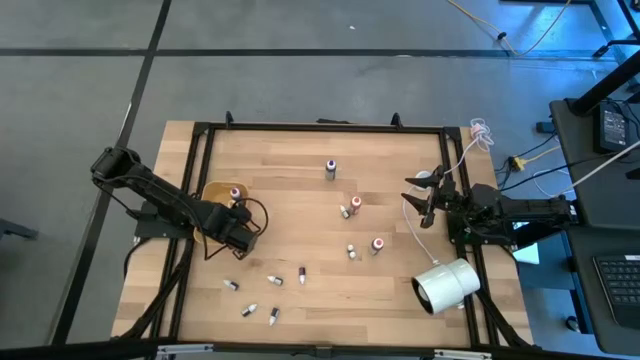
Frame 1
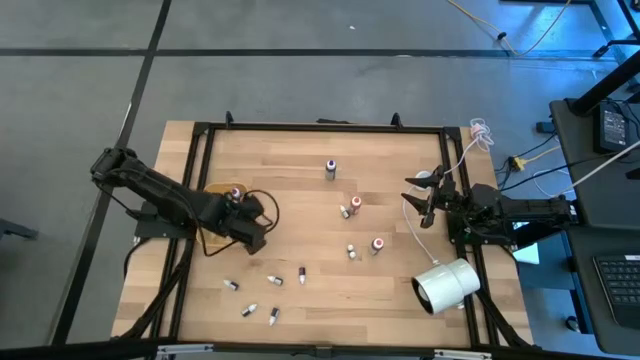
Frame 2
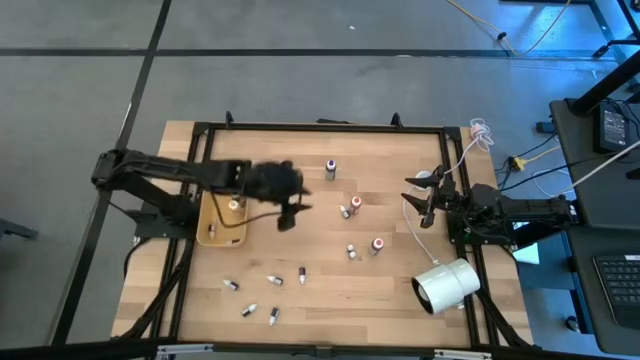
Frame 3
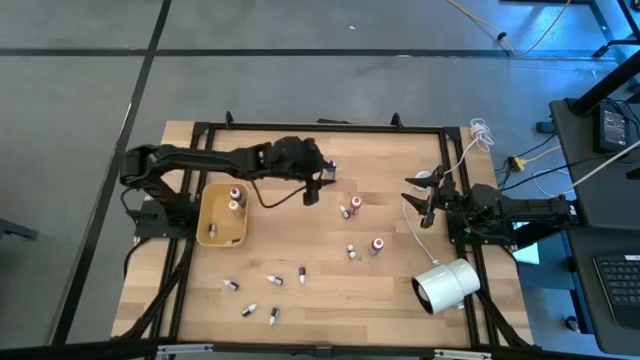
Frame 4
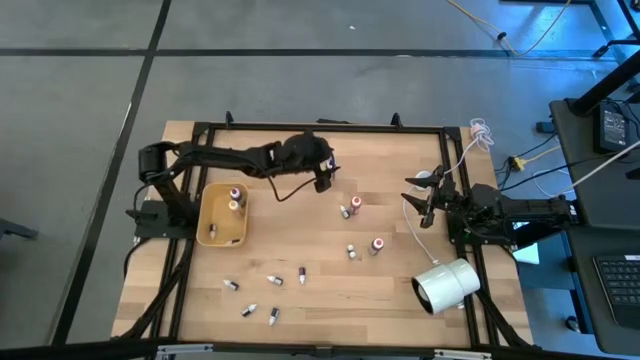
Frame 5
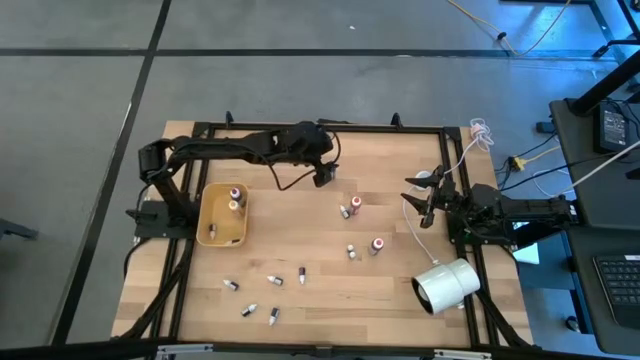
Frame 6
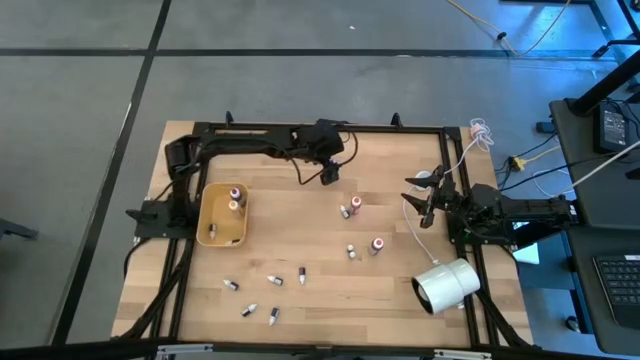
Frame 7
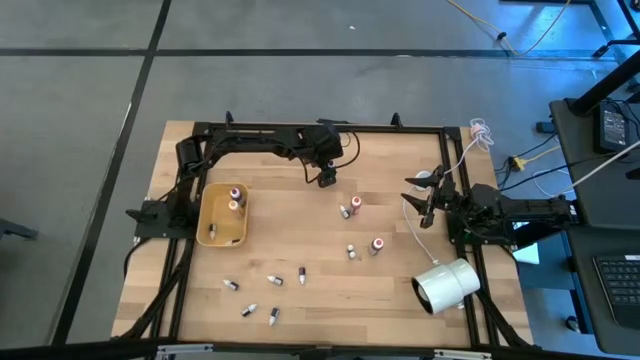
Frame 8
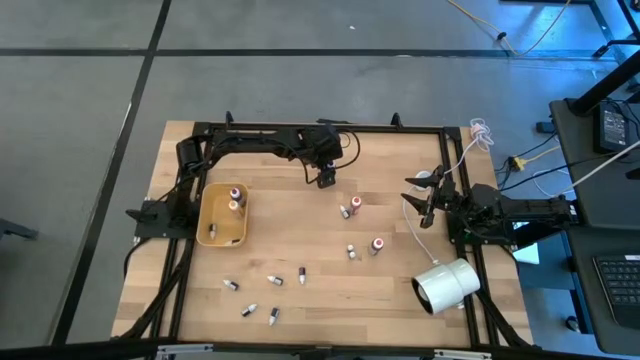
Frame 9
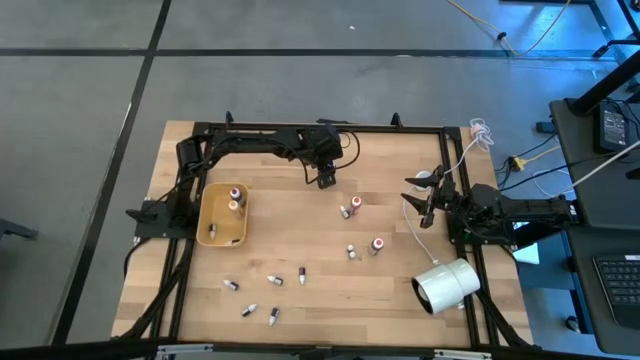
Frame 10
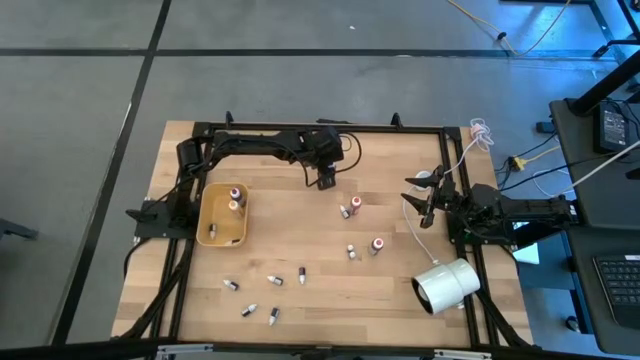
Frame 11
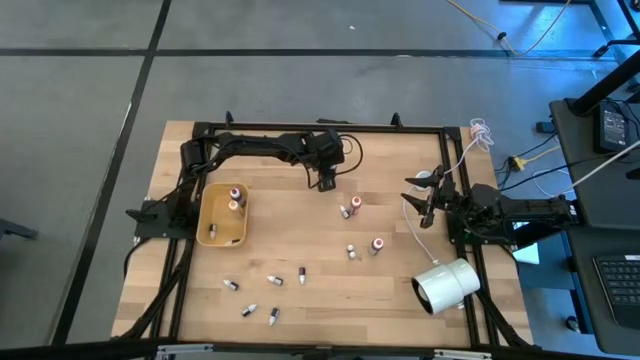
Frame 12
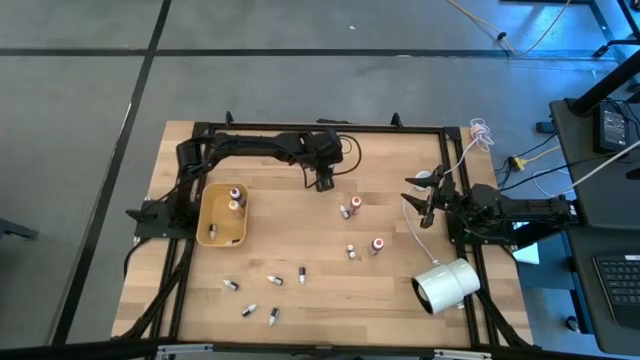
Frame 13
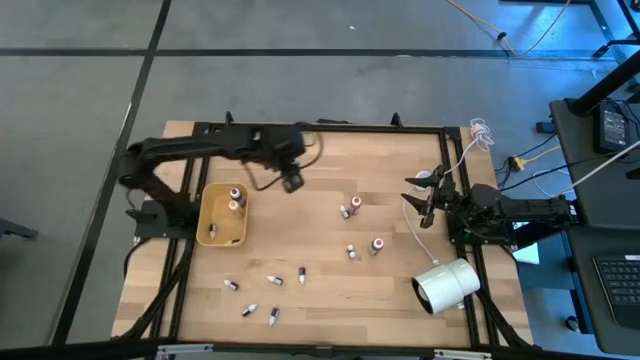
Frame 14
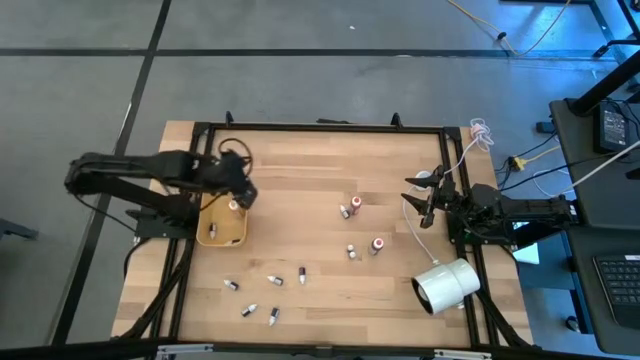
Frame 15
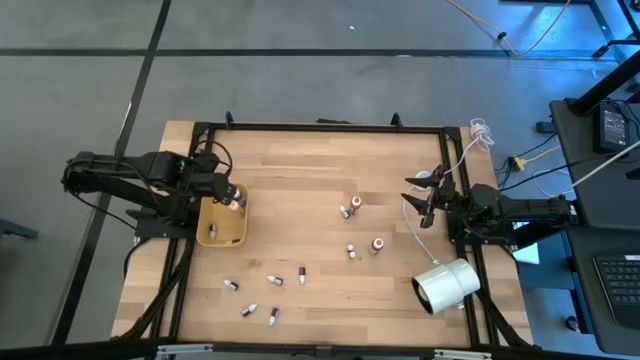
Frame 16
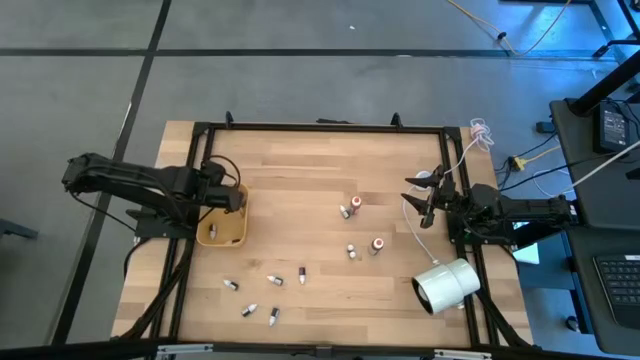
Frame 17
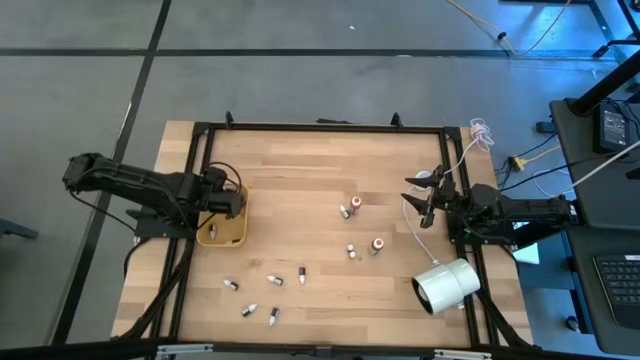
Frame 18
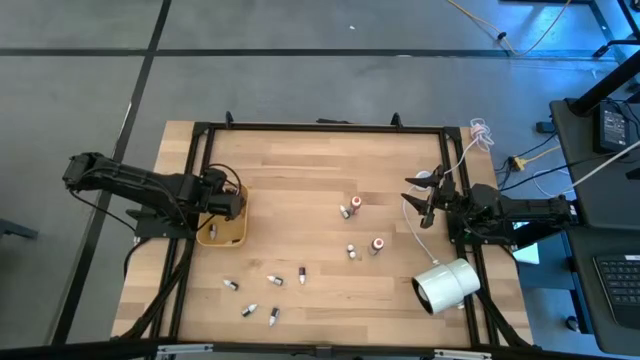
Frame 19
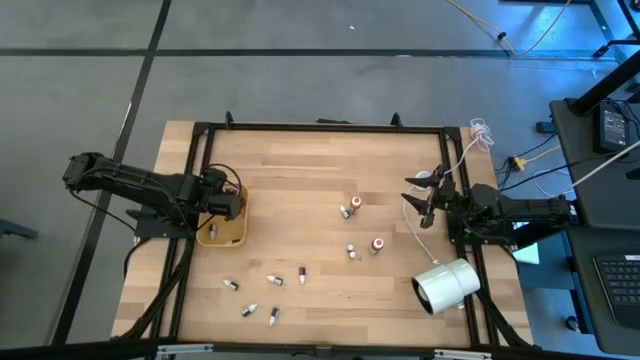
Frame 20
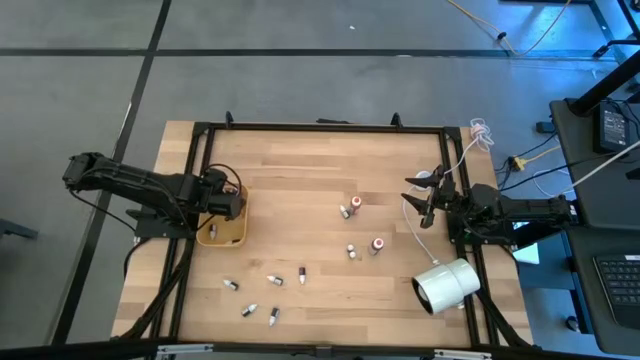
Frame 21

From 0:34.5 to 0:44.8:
Task: Pick & Place food coloring
Put the large blue food coloring bottle into the yellow bin

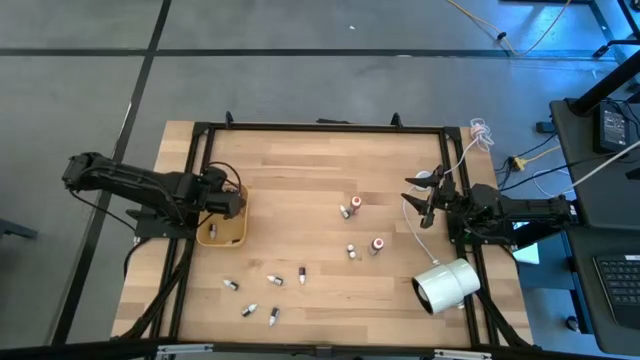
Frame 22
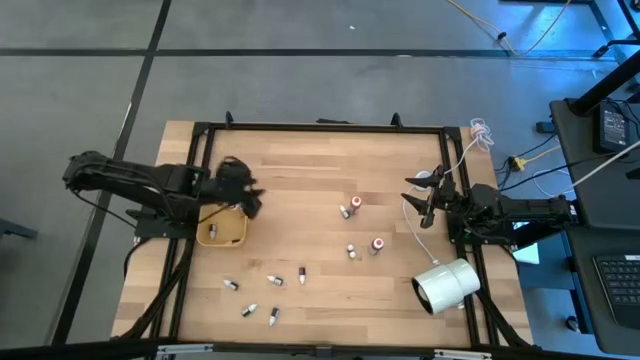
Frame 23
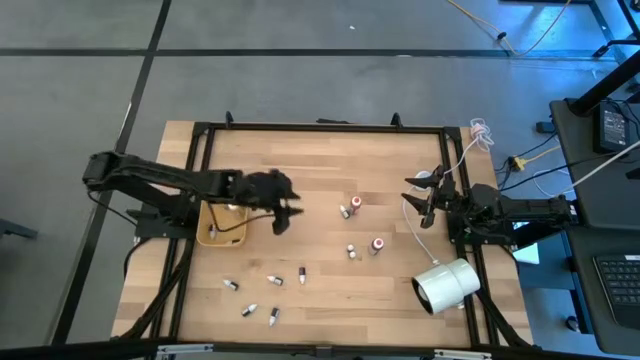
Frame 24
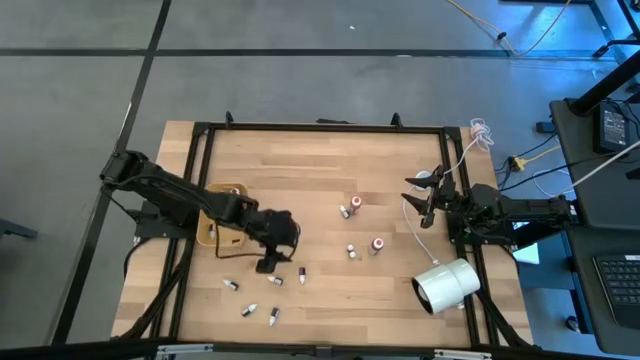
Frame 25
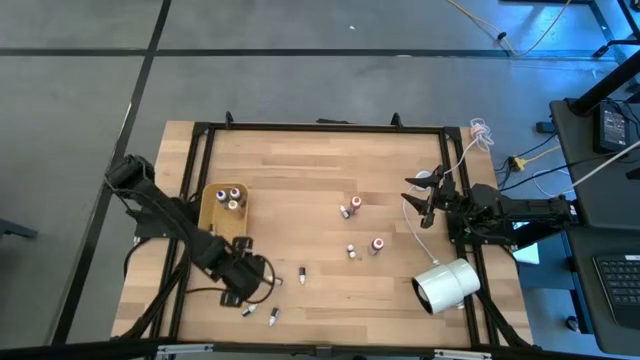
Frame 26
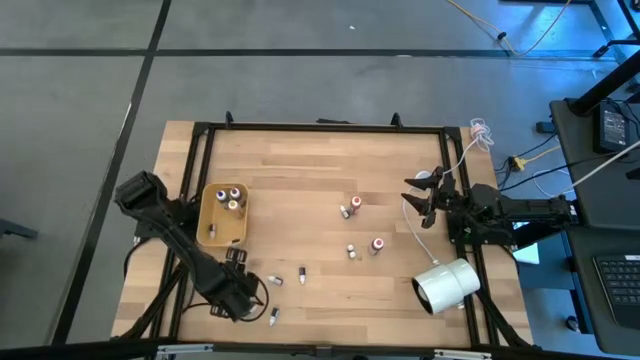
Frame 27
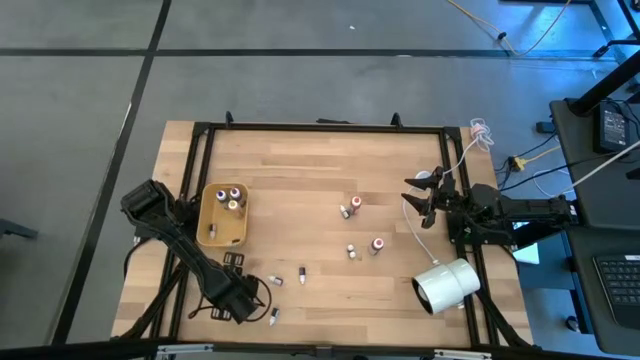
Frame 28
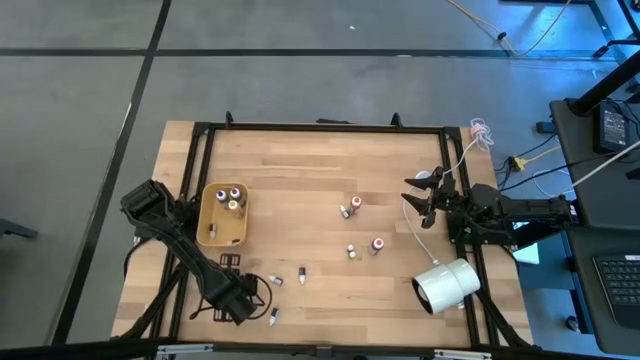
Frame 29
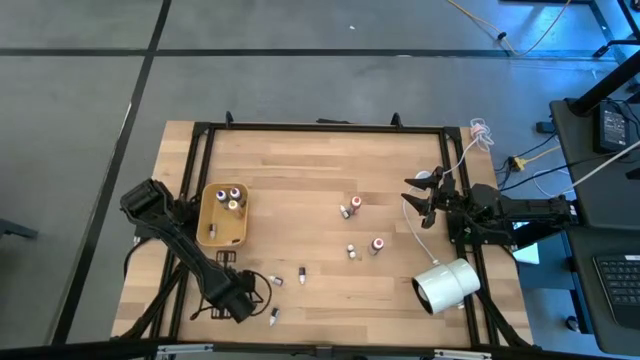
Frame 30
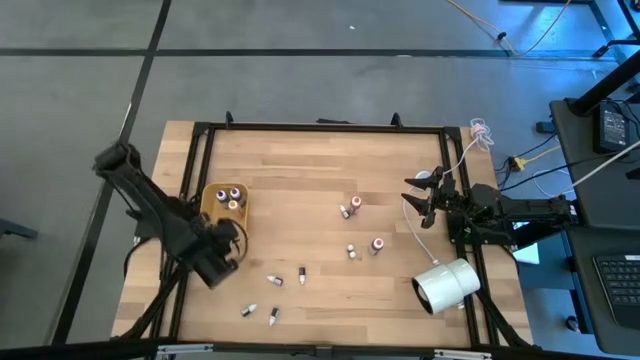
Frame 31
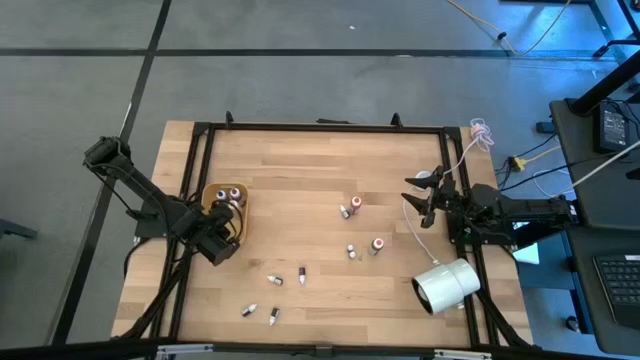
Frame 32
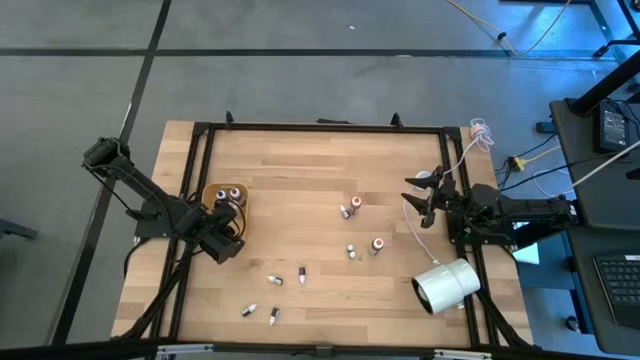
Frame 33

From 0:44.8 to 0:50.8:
Put the small blue food coloring bottle into the yellow bin

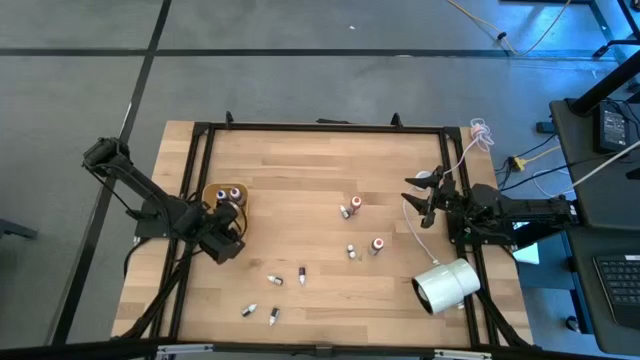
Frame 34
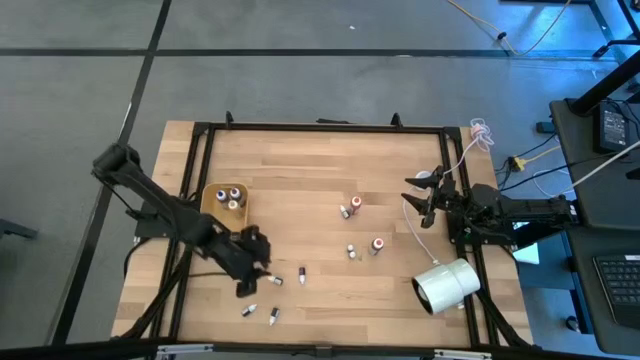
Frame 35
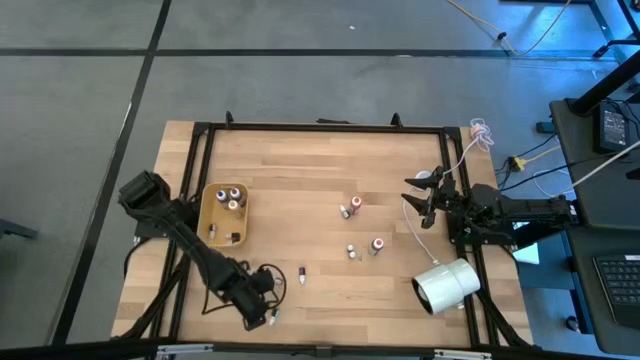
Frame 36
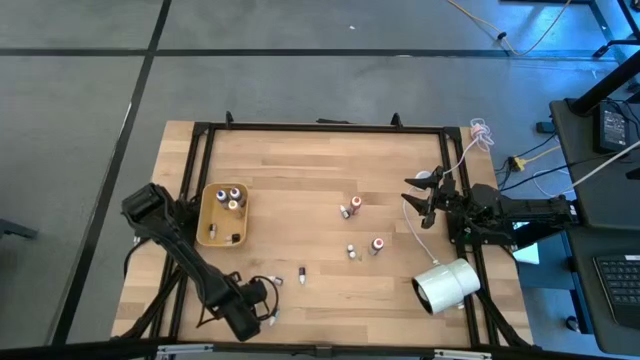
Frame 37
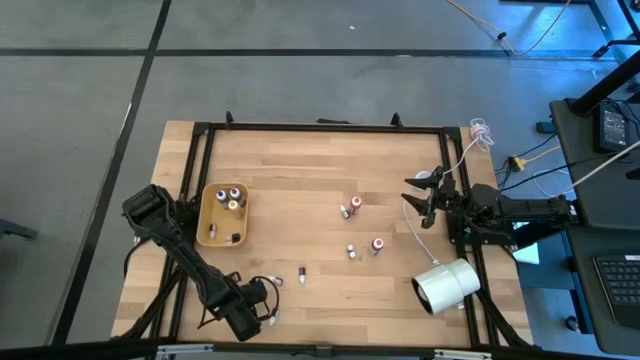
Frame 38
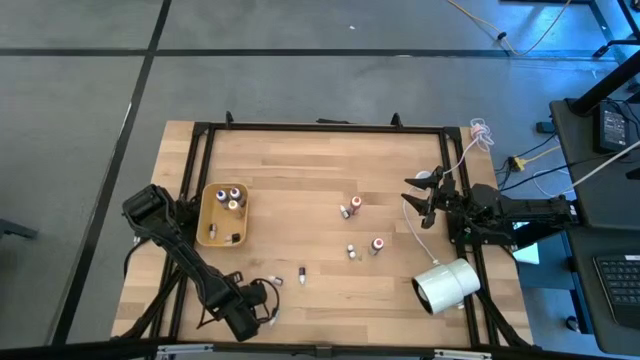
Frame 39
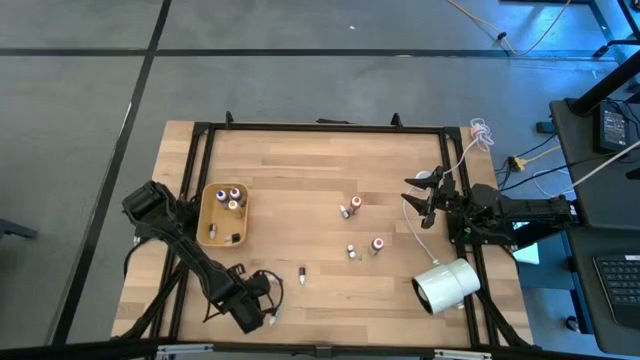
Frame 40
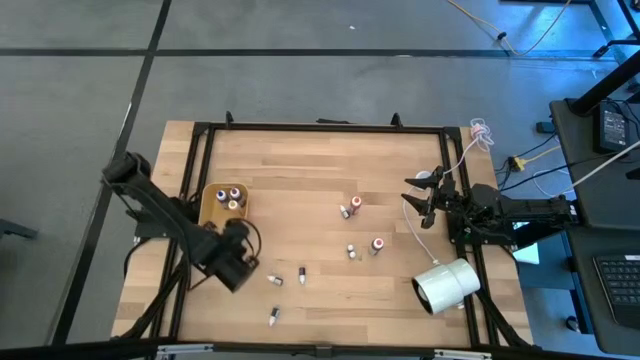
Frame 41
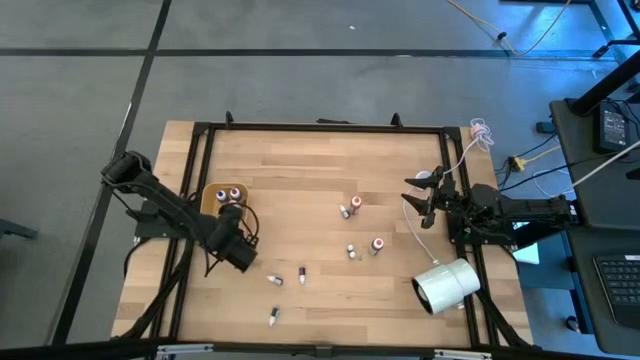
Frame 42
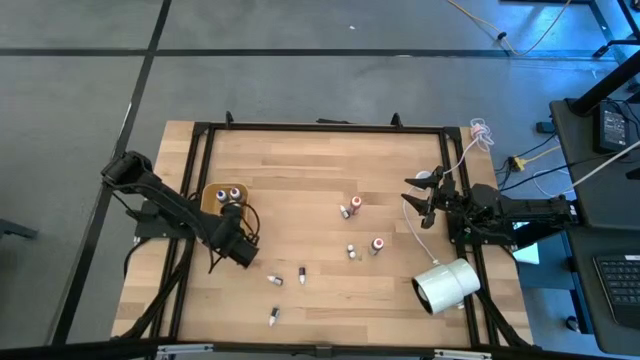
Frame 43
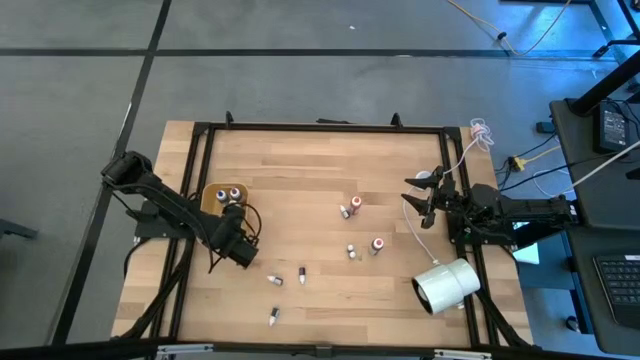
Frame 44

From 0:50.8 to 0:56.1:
Put the small red food coloring bottle into the yellow bin
